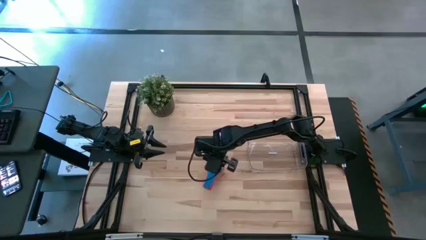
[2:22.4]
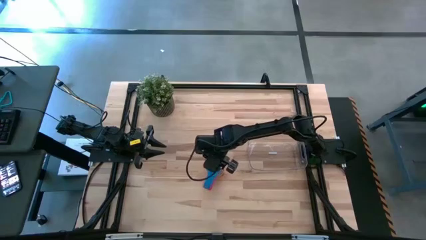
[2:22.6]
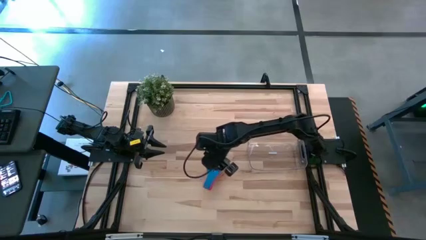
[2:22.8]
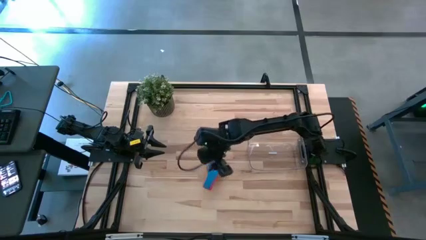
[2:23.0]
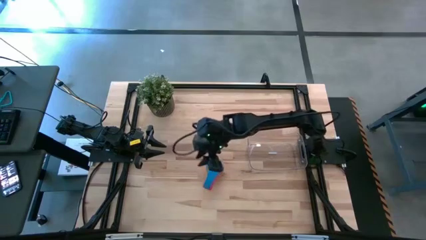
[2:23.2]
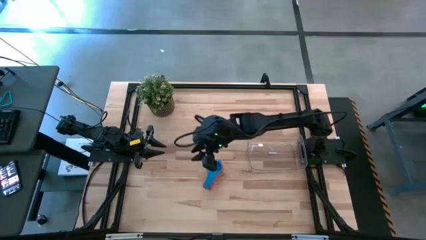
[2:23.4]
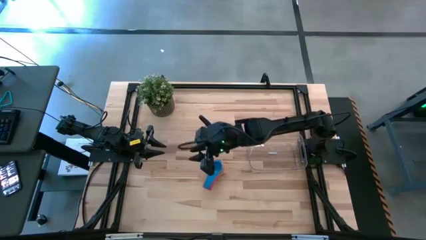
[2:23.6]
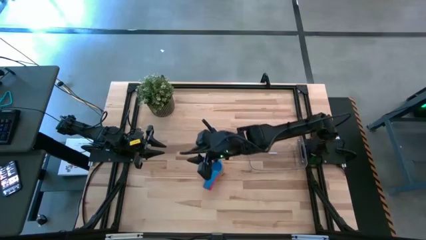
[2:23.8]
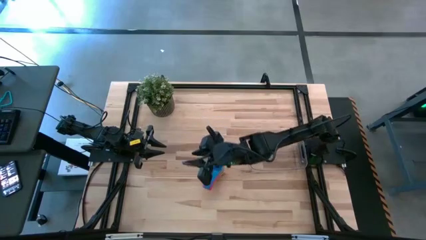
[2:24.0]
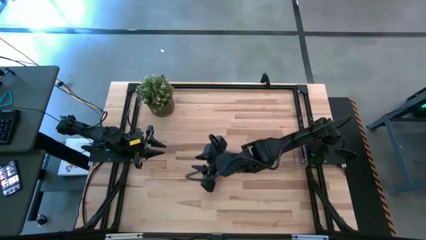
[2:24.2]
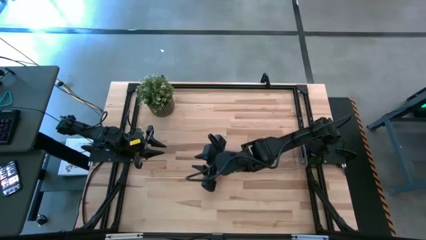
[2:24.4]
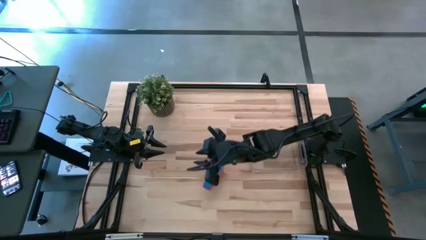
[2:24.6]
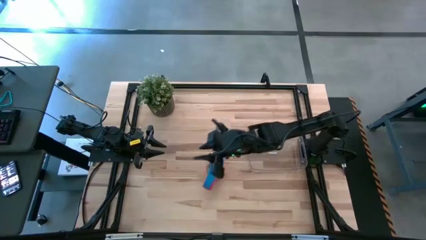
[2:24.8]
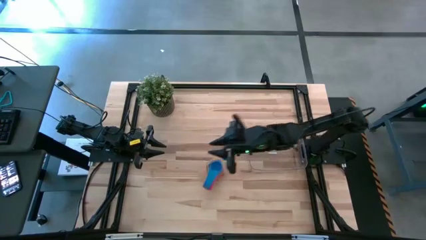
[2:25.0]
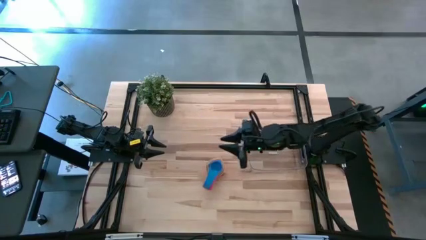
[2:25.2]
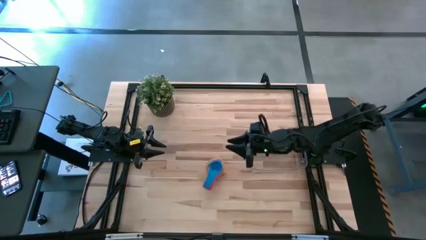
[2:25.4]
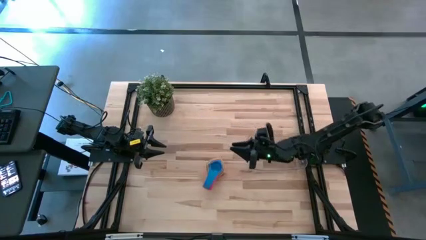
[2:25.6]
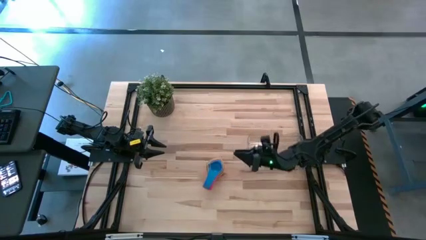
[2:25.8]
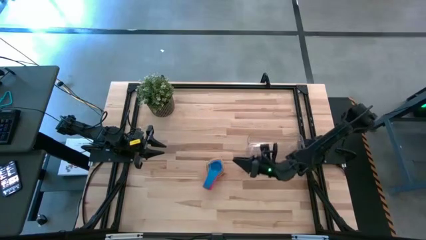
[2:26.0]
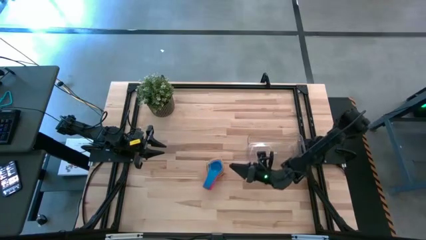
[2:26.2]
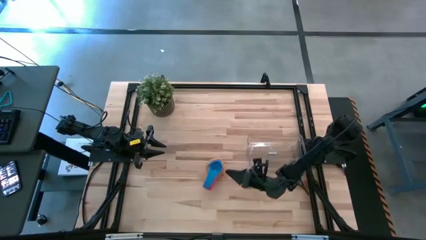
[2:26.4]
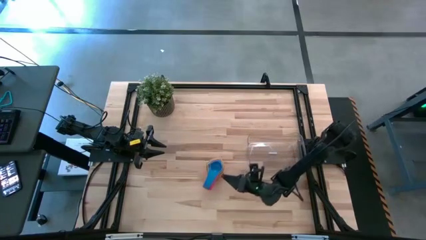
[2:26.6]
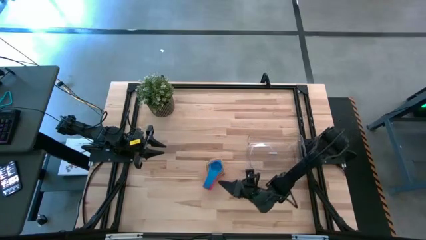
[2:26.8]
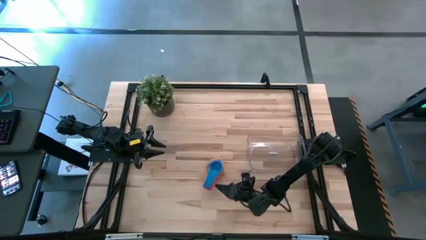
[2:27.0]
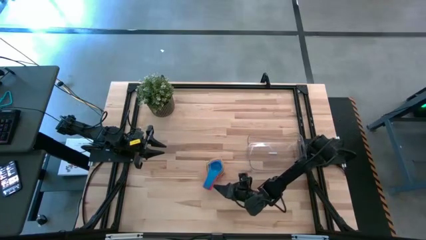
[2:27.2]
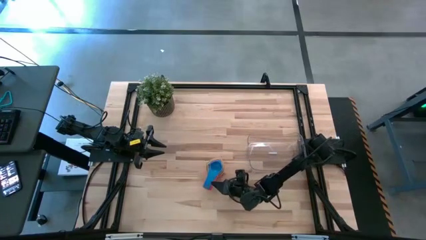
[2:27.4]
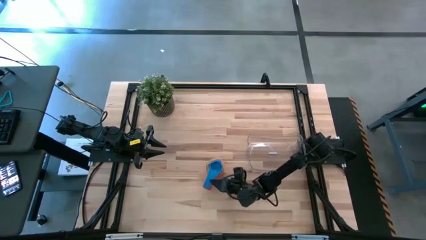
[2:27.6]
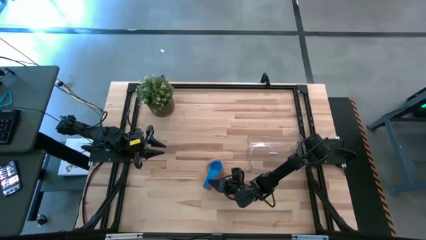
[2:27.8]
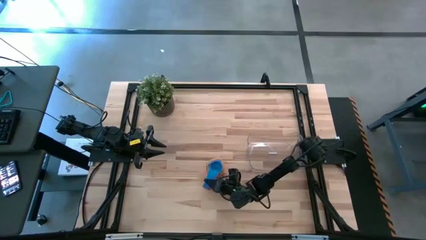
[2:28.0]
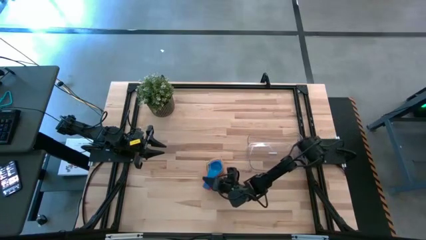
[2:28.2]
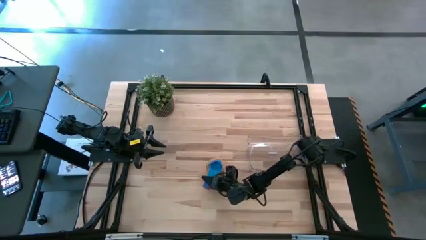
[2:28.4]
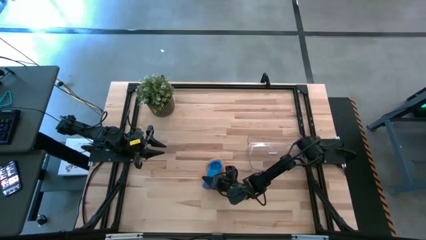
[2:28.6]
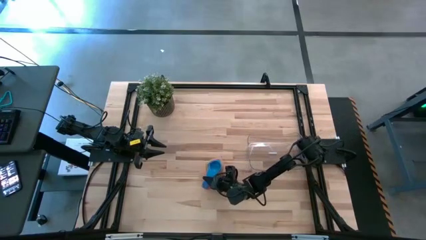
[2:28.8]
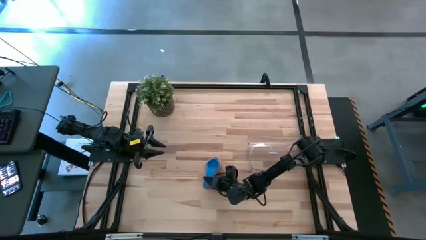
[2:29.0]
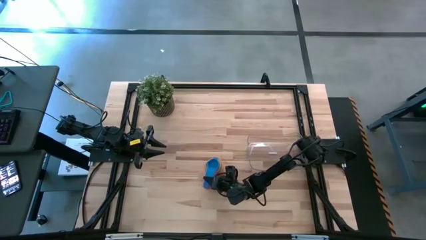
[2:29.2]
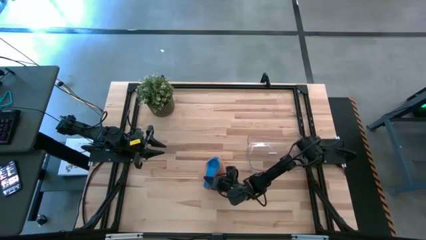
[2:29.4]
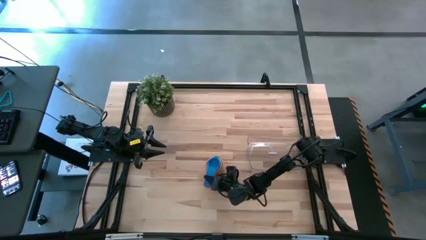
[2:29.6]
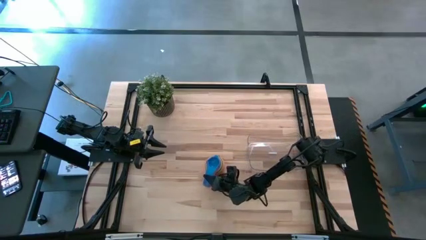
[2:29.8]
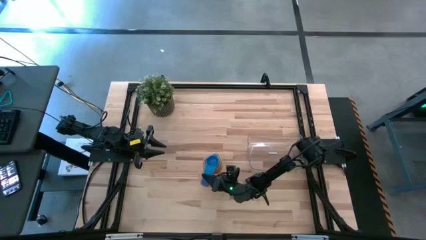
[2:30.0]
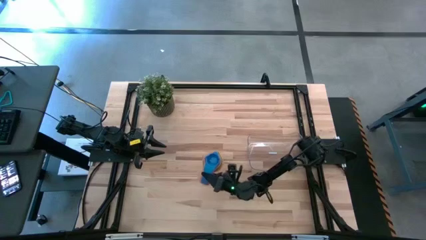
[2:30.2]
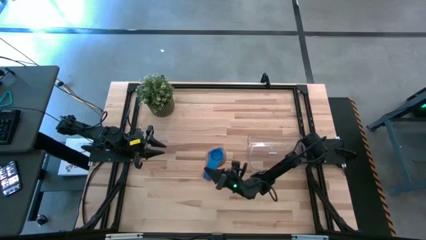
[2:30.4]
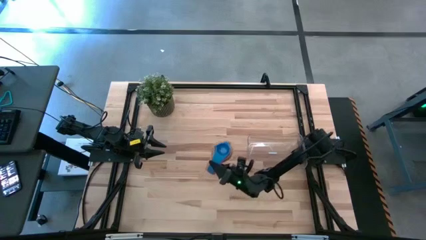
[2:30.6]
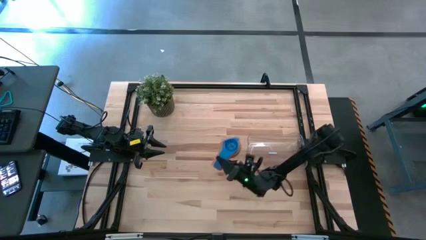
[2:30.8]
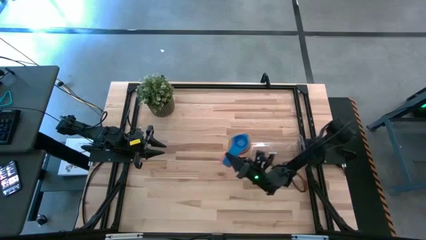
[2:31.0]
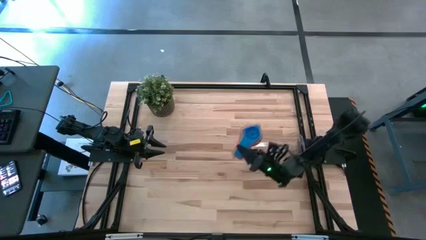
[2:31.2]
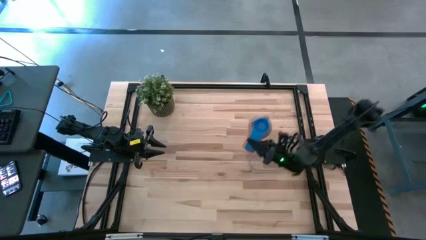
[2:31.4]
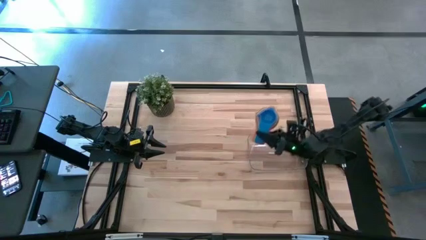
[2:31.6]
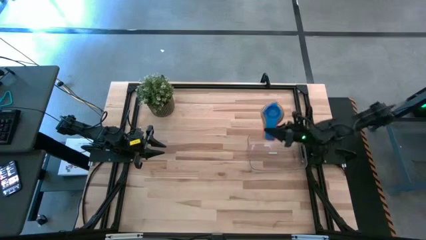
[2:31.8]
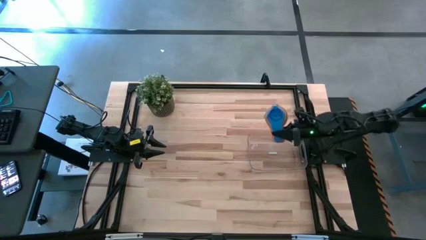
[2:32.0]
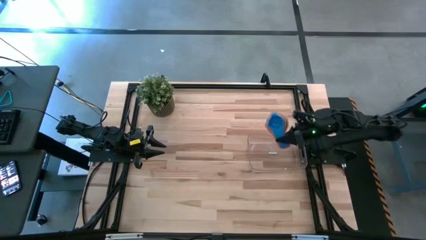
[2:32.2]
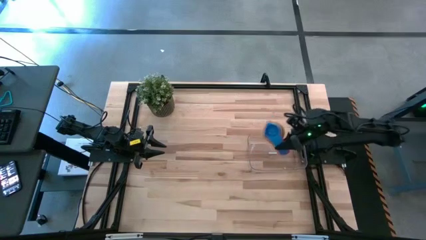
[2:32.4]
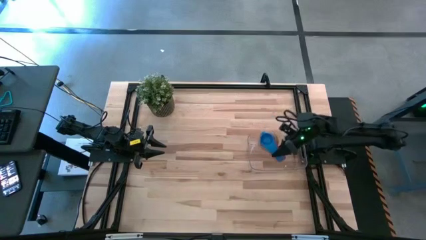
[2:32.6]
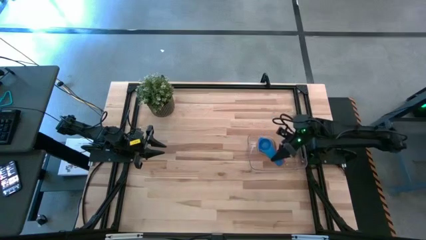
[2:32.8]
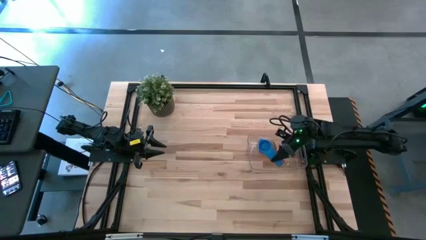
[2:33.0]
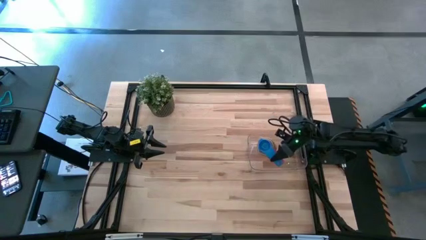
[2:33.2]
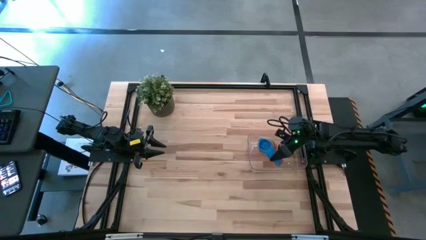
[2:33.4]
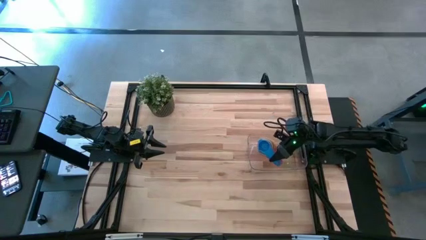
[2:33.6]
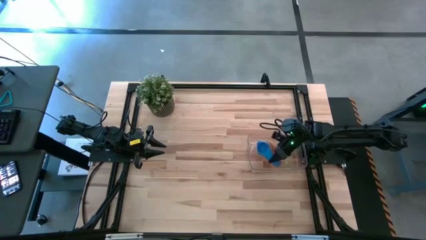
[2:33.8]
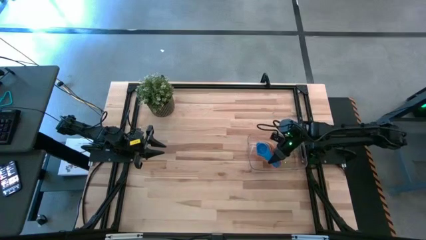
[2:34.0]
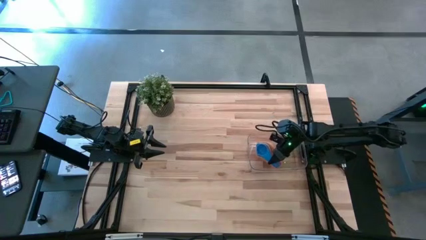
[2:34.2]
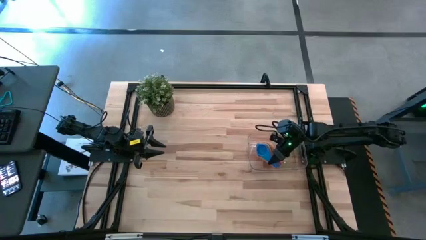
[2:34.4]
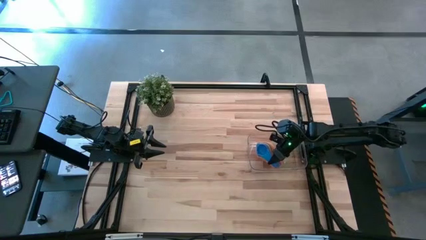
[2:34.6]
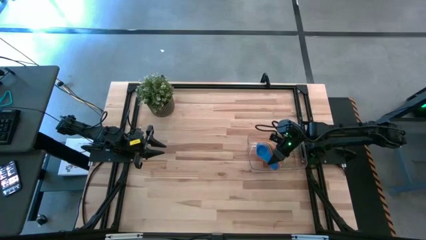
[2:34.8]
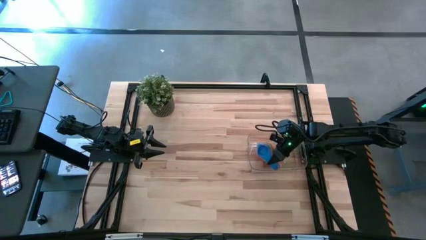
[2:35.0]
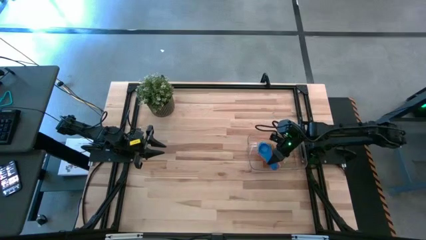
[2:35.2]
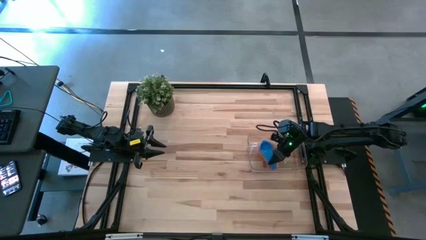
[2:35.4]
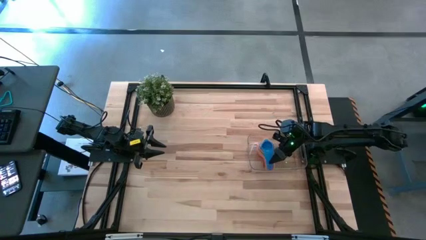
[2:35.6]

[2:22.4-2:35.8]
Task: Nest measuring cups in basket
Put the stacked measuring cups into the transparent bin

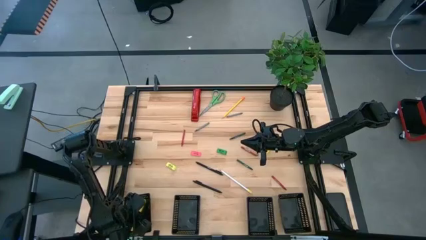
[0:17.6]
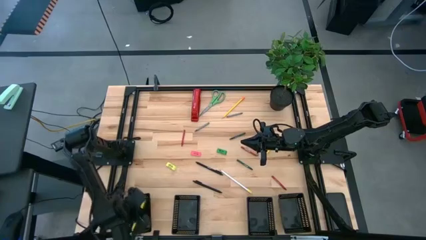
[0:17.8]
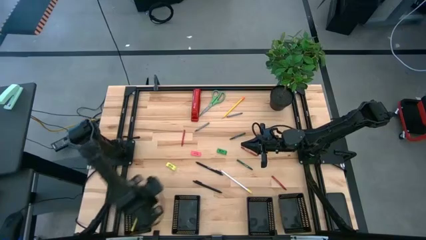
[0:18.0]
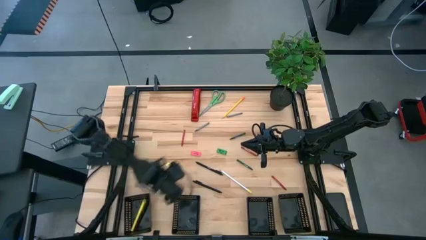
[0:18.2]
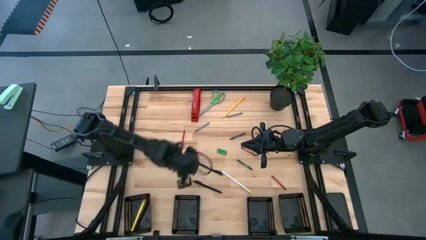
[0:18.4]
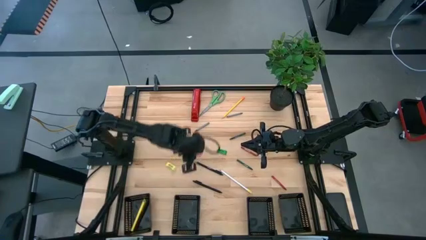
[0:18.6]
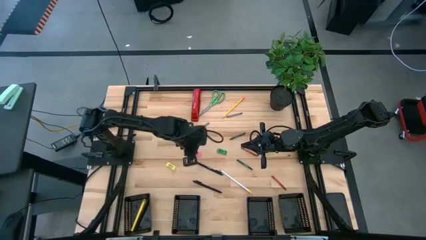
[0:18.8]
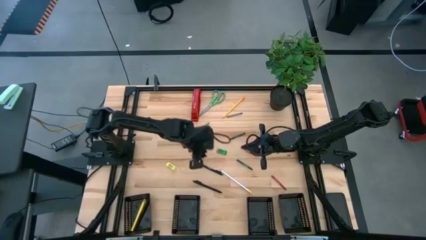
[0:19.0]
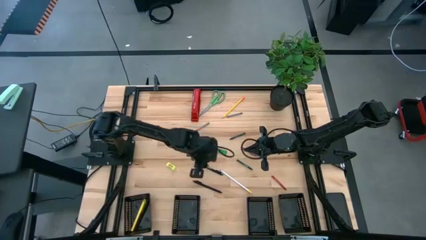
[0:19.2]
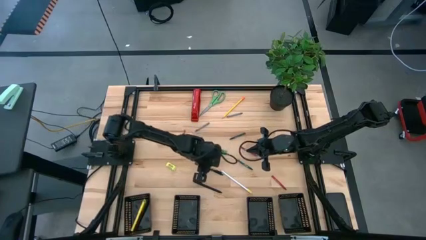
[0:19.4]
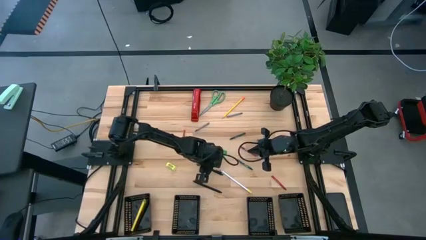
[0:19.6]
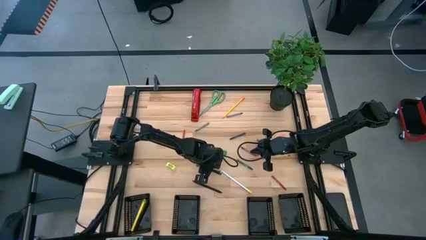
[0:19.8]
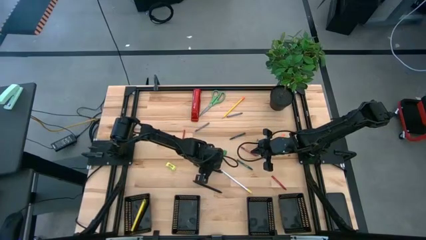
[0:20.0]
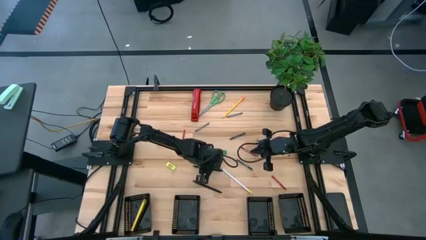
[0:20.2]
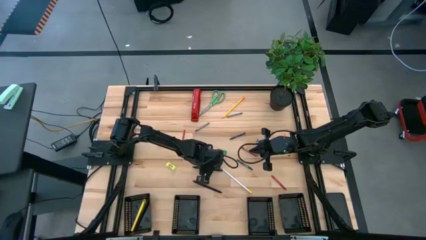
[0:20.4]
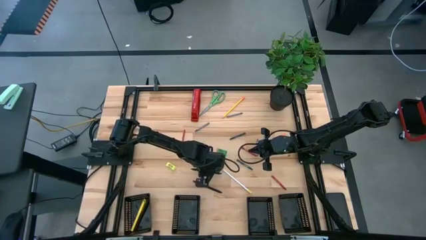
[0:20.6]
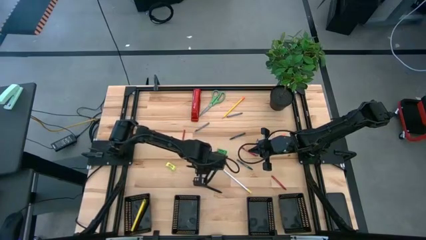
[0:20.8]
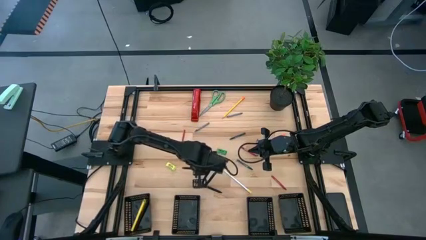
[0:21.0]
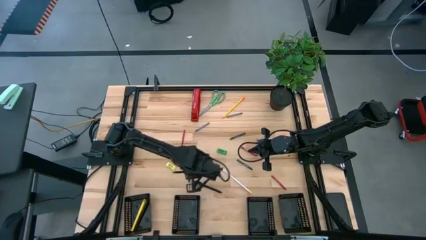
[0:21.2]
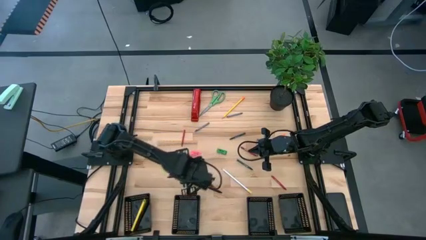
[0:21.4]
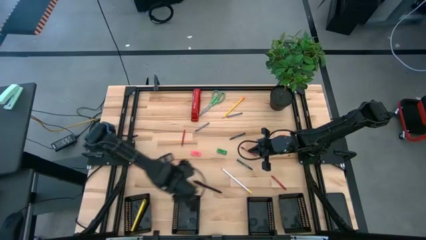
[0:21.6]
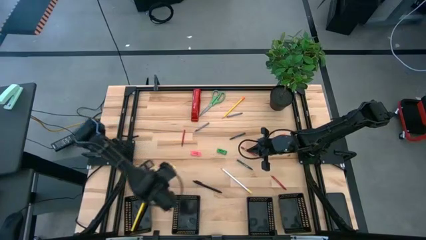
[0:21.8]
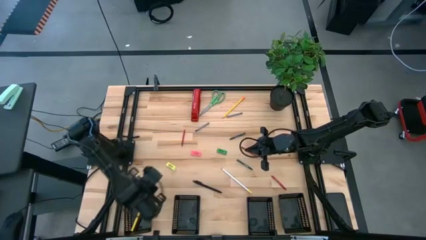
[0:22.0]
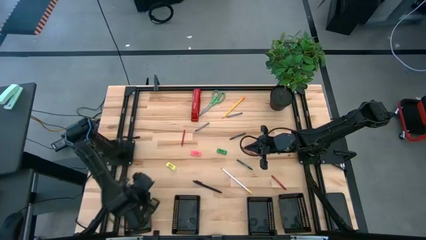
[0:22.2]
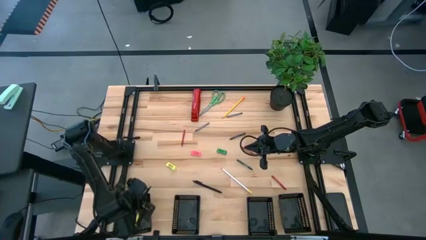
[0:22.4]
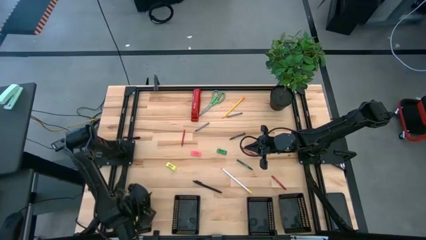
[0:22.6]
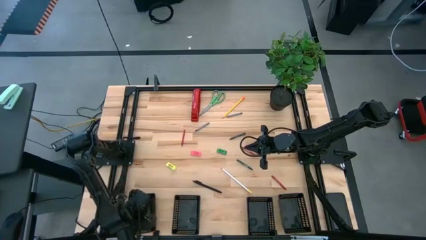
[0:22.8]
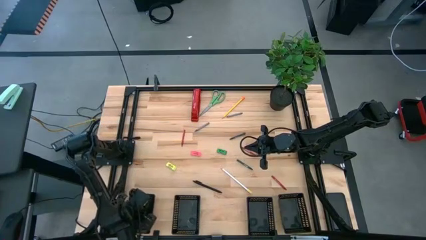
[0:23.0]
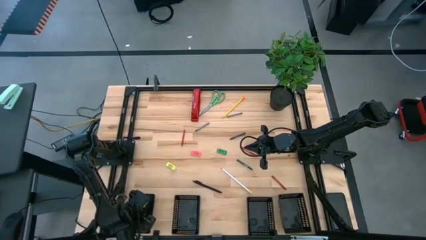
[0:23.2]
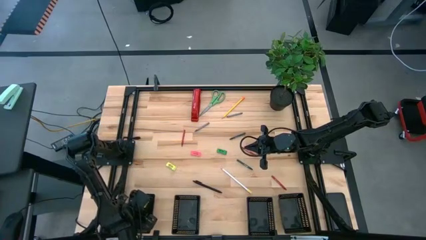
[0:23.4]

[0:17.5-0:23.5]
Task: Sort crayons/erasers/pens/pencils in bins
Put the top black pen into the left black bin
